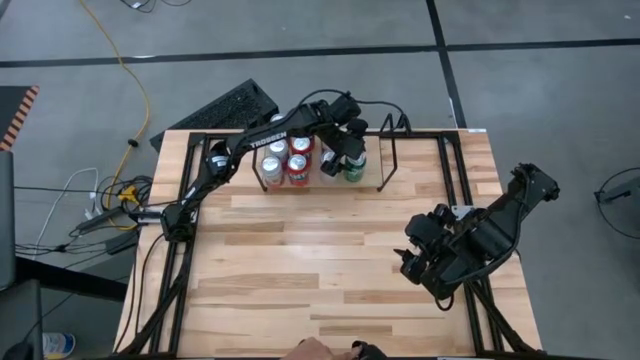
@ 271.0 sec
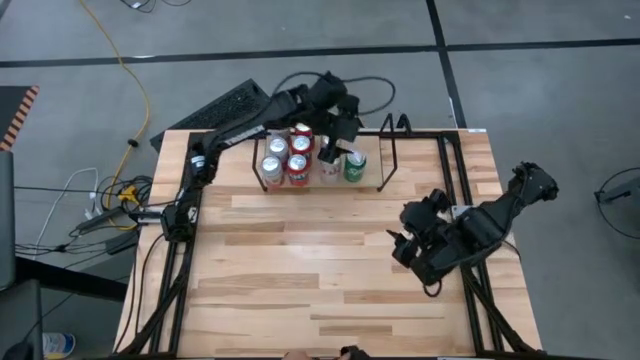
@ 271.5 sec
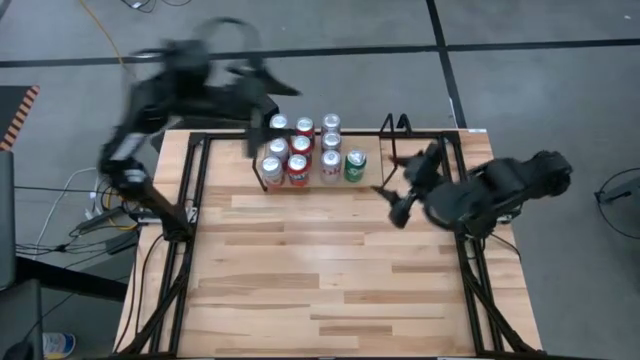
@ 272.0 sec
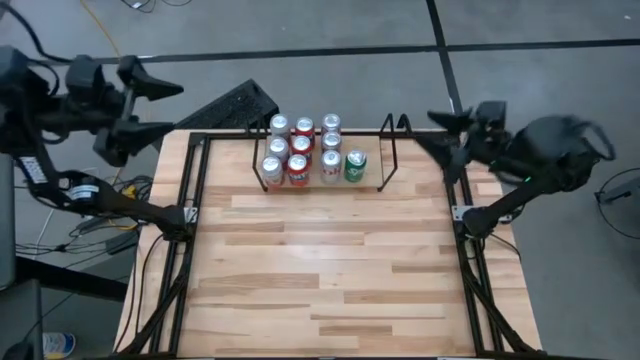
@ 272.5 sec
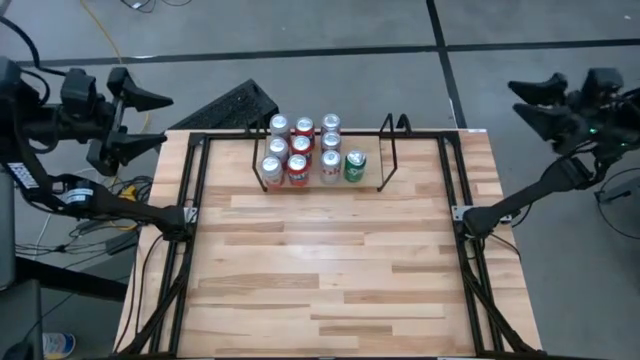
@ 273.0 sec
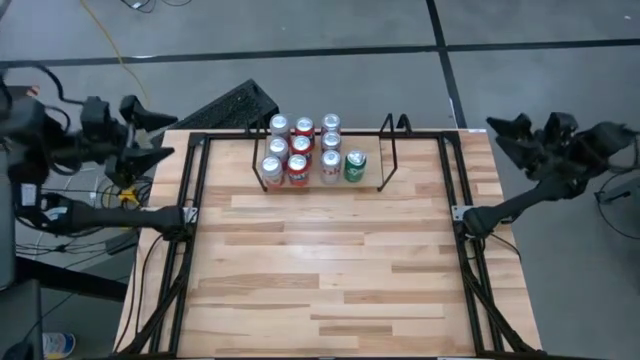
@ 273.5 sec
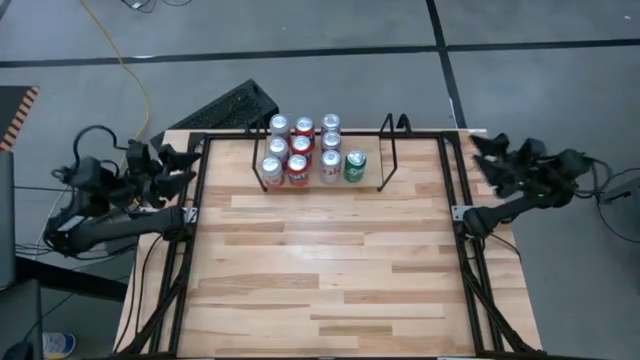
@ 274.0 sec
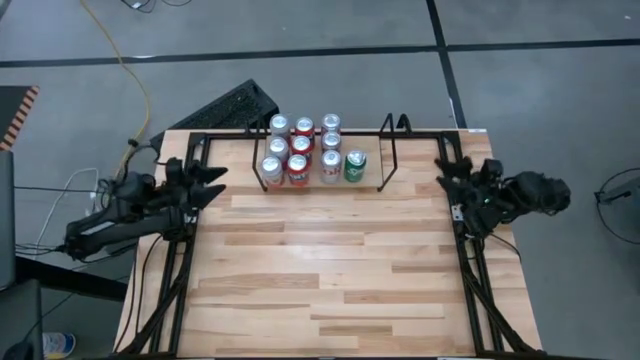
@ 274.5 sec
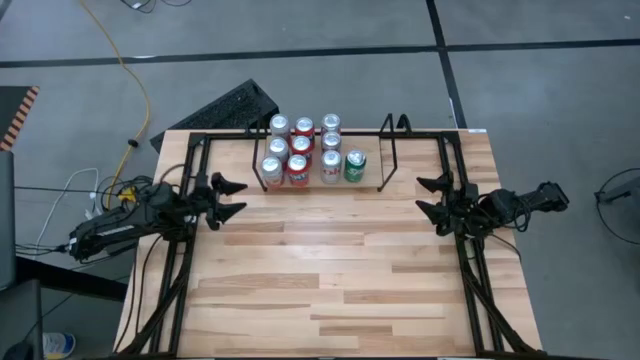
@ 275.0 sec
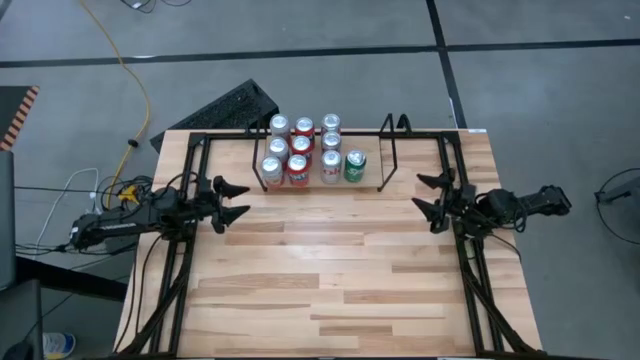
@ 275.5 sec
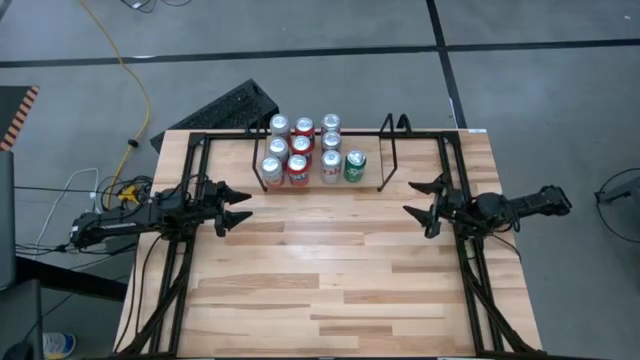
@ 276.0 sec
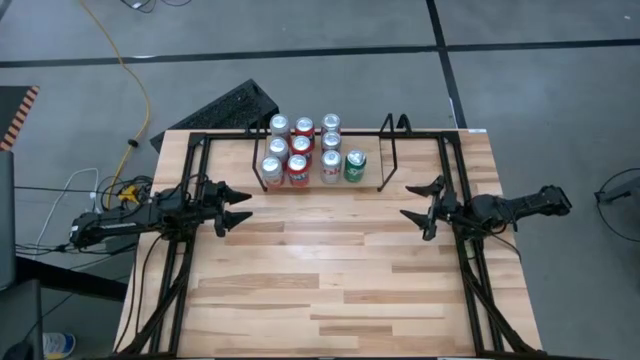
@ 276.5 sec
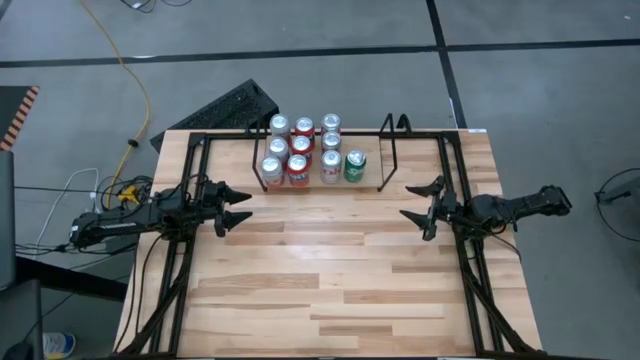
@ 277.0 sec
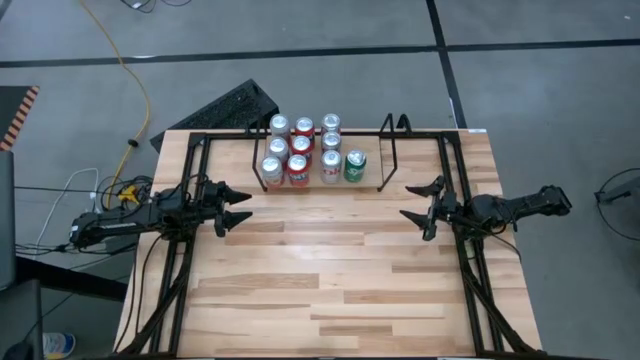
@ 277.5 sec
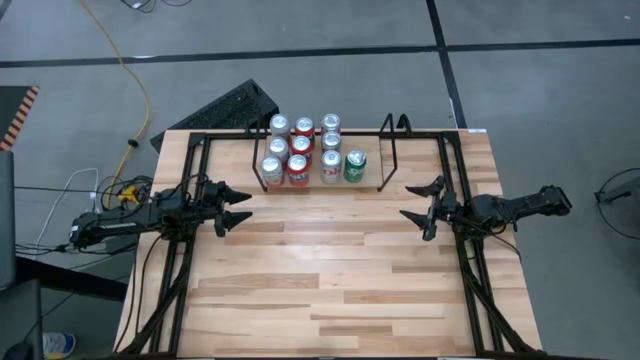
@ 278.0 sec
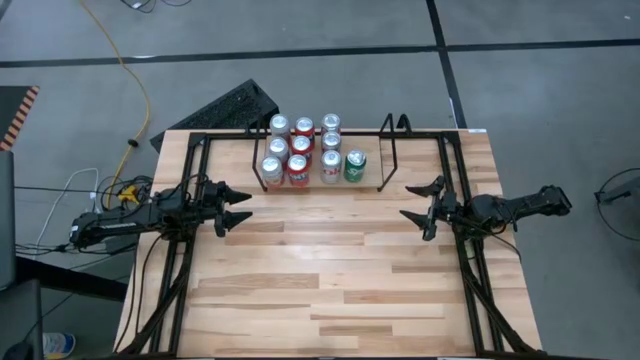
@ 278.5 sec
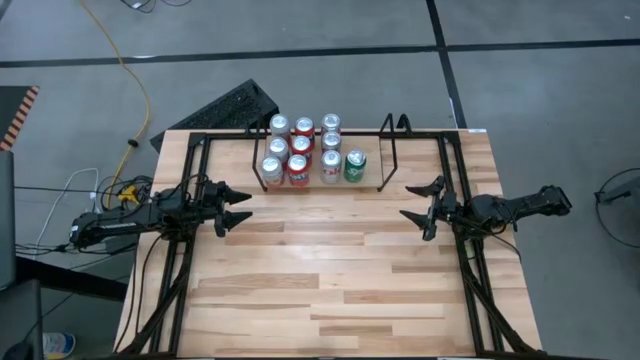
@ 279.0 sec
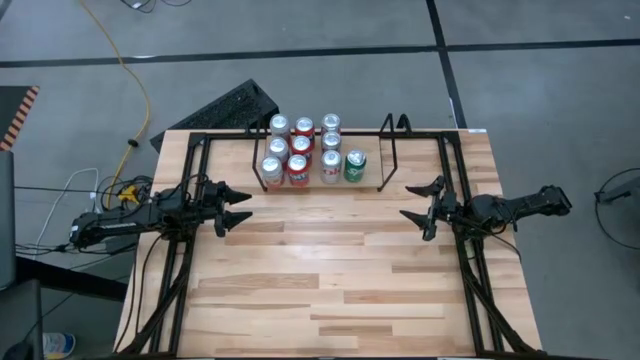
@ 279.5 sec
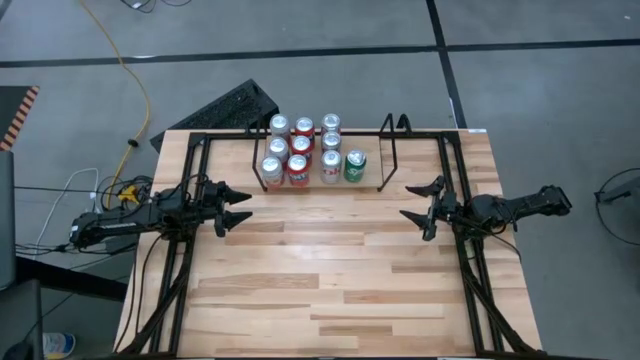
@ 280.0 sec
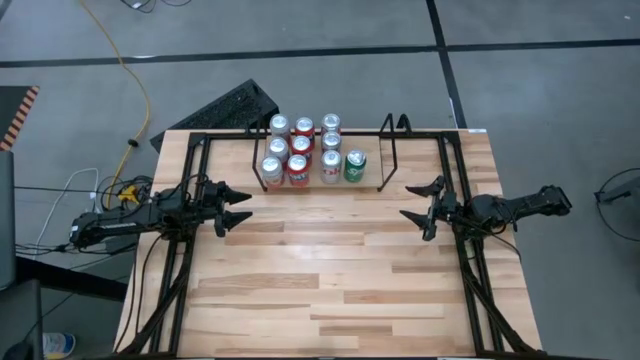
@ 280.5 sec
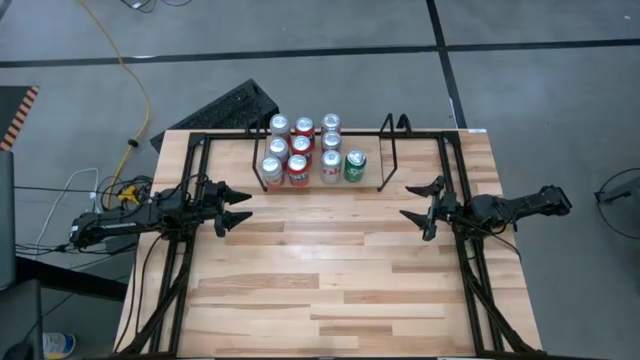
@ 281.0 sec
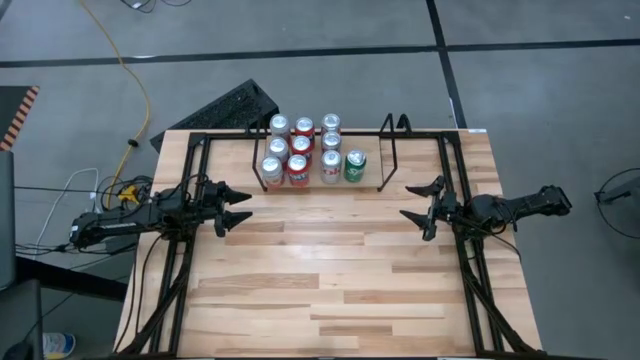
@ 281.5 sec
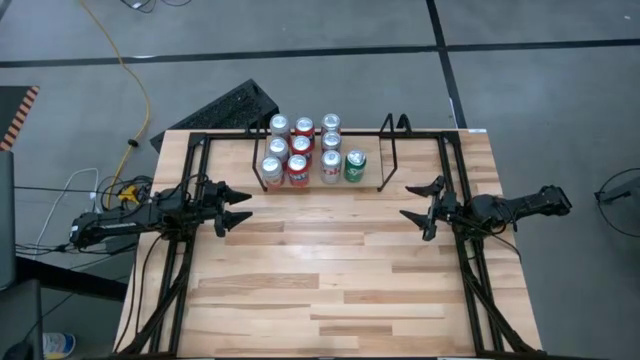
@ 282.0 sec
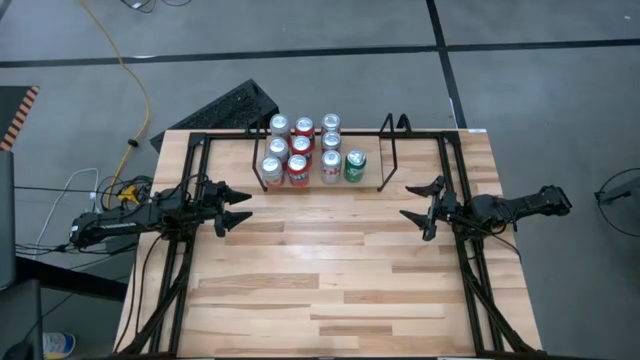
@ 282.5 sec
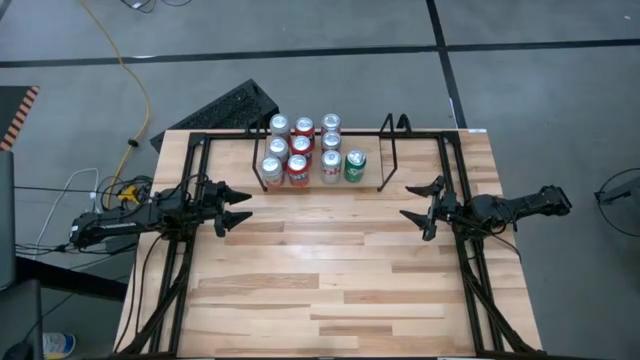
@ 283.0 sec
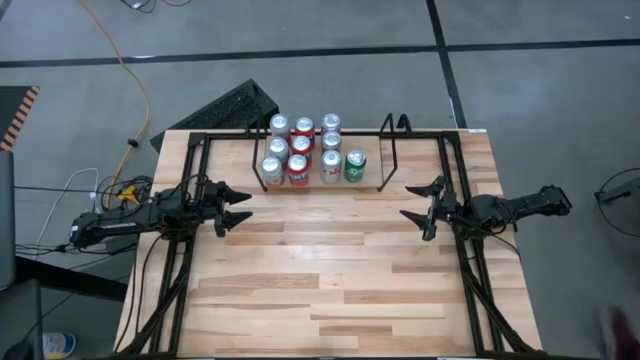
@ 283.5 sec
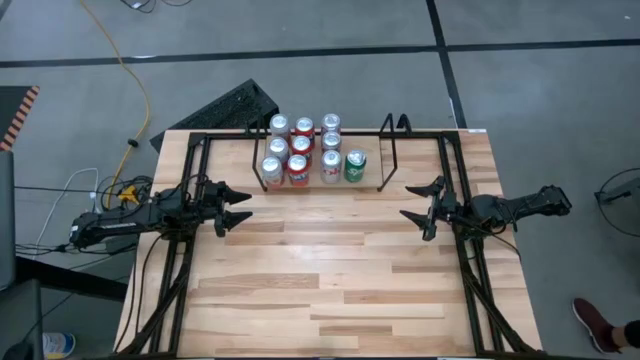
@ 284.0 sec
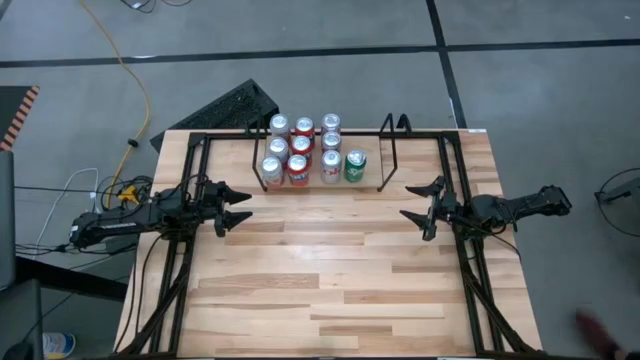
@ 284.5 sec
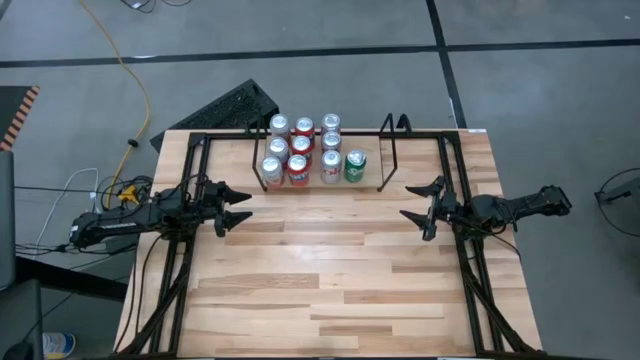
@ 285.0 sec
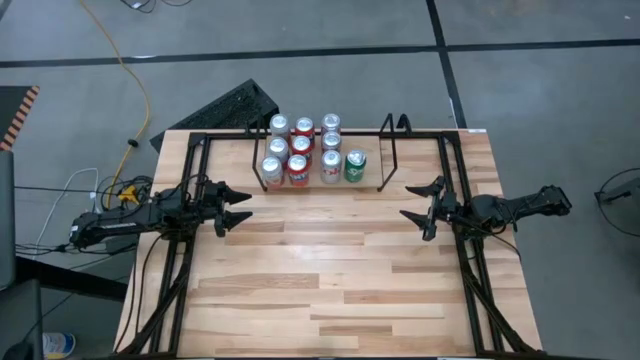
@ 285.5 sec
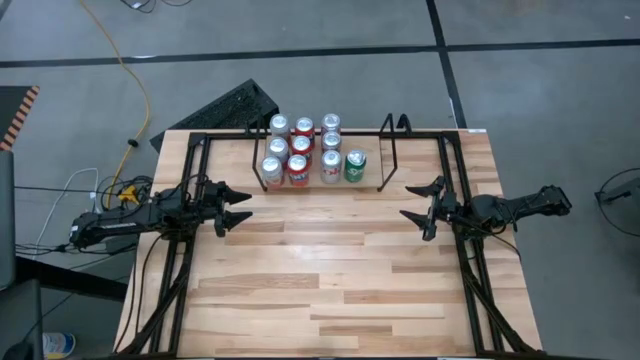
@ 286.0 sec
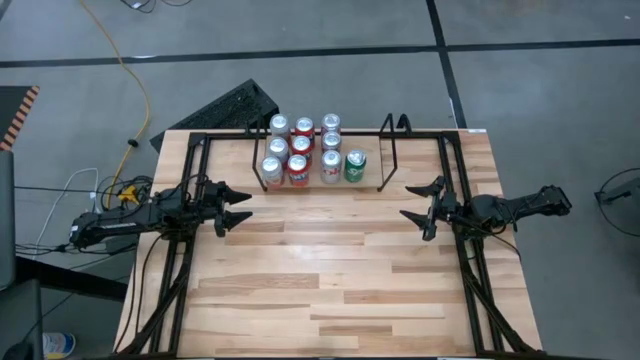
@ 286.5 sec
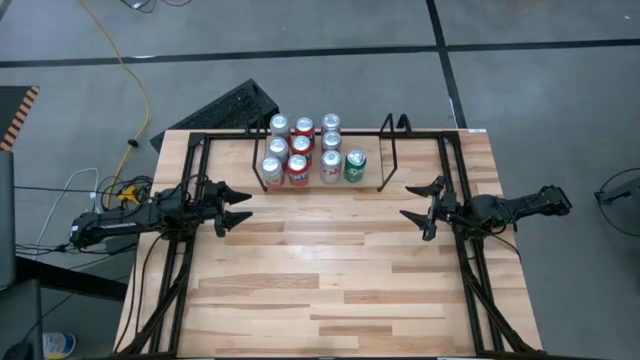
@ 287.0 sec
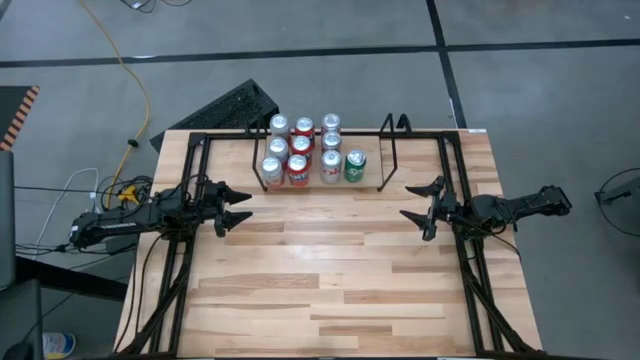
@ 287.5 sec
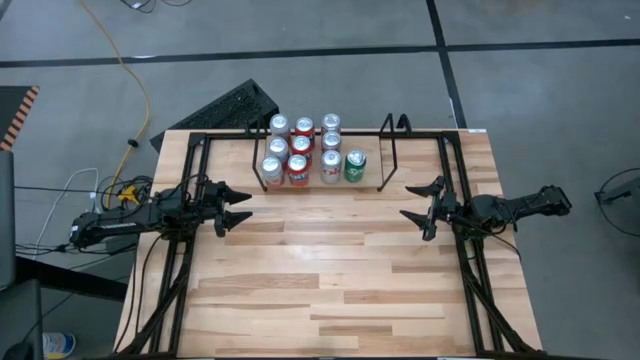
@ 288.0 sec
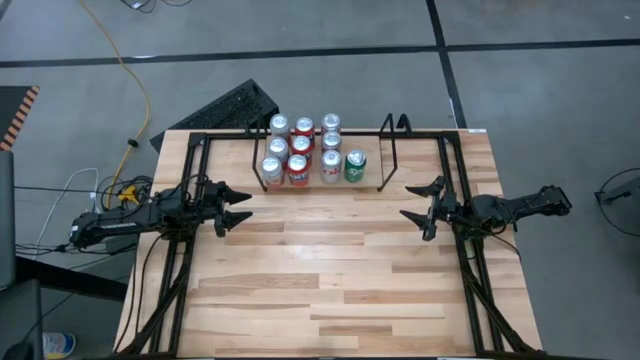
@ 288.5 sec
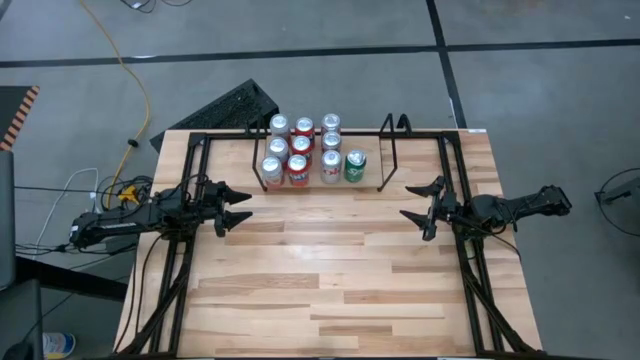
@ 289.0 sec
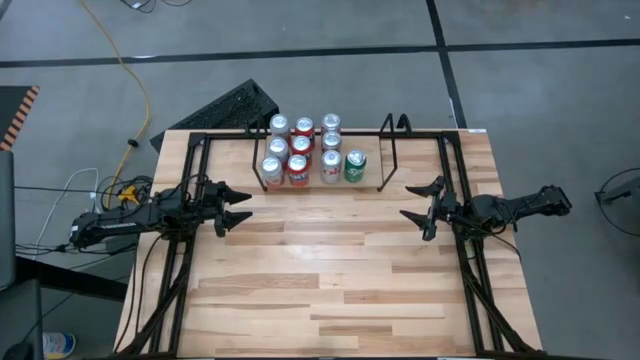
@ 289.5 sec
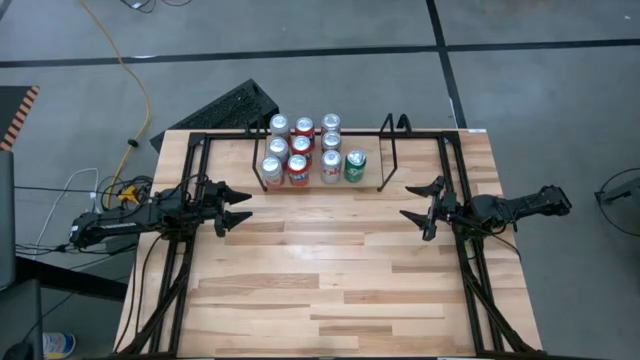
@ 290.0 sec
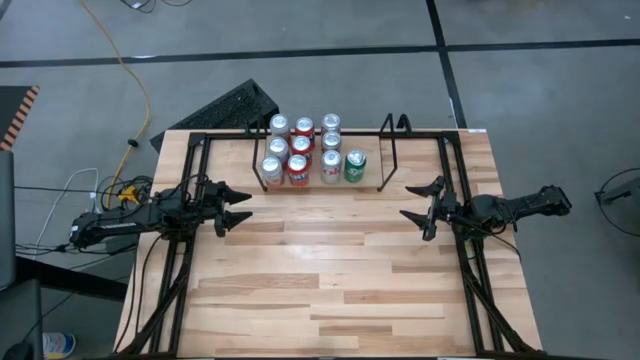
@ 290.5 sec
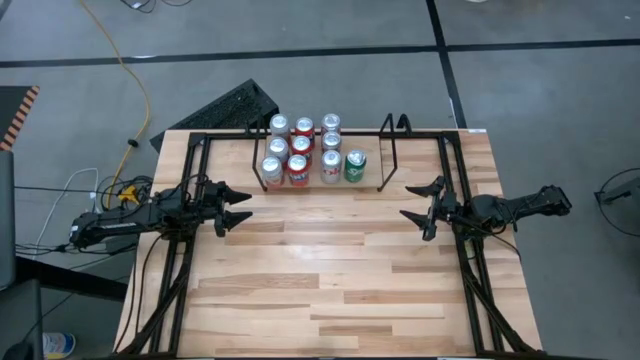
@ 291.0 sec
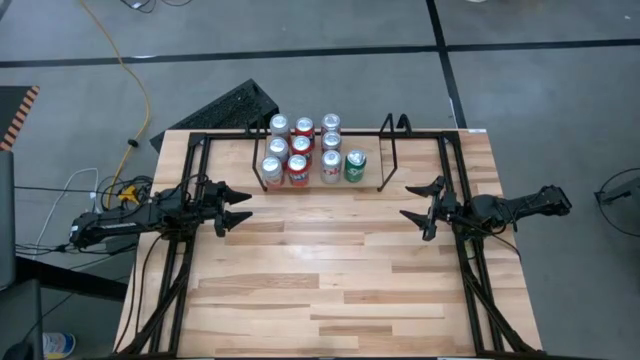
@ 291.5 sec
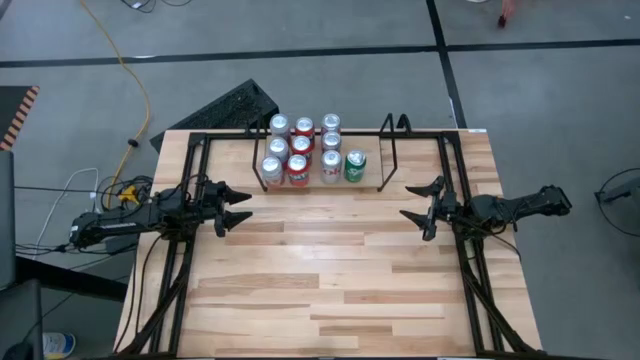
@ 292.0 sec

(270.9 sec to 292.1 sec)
Task: Place canned beverage on shelf
Return to Home Position
